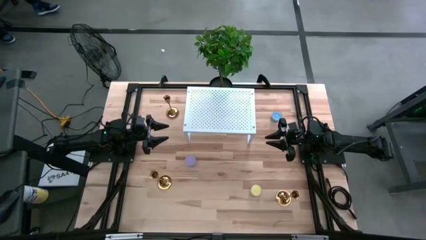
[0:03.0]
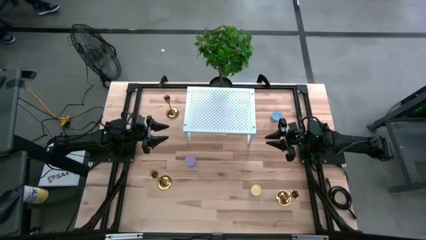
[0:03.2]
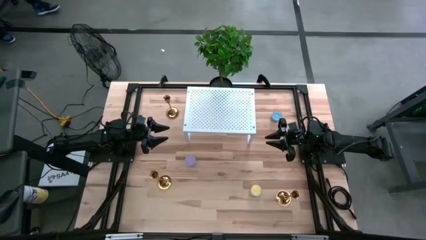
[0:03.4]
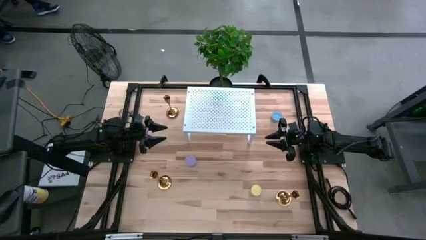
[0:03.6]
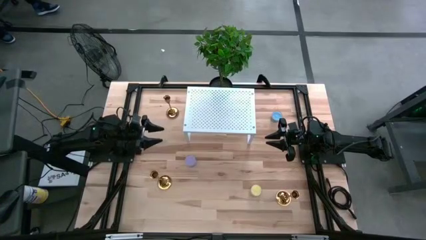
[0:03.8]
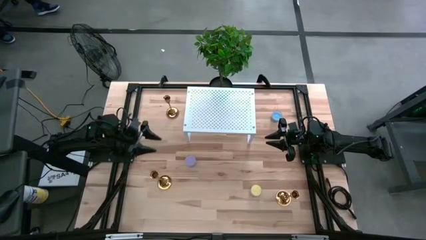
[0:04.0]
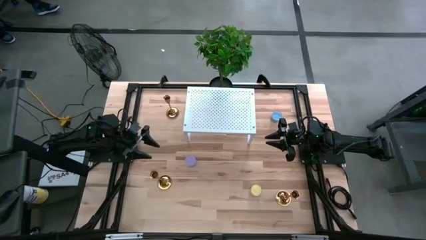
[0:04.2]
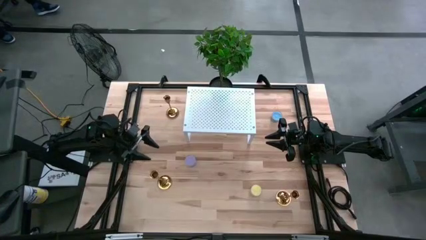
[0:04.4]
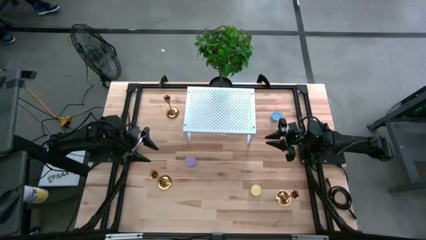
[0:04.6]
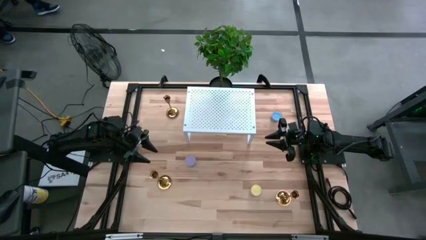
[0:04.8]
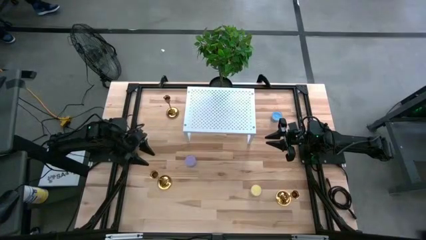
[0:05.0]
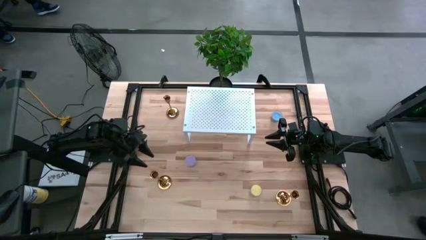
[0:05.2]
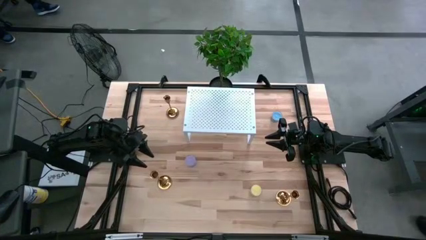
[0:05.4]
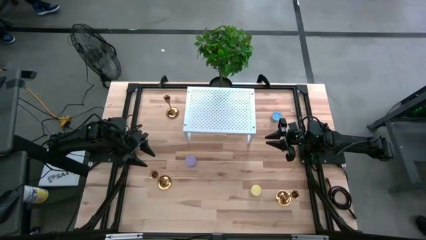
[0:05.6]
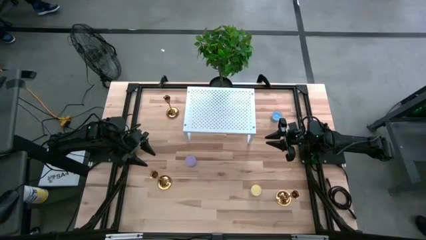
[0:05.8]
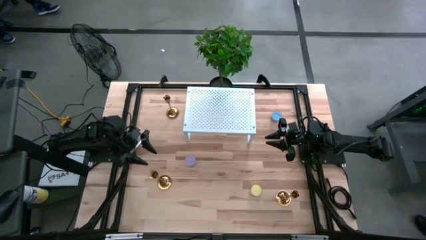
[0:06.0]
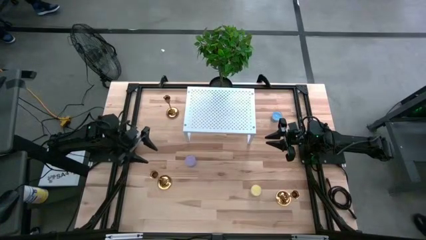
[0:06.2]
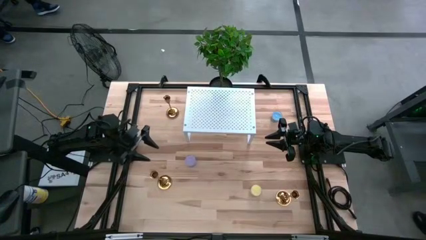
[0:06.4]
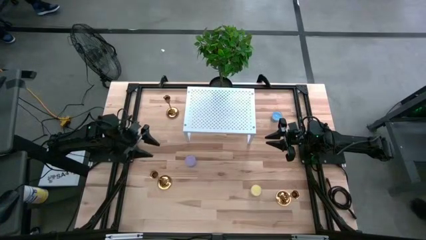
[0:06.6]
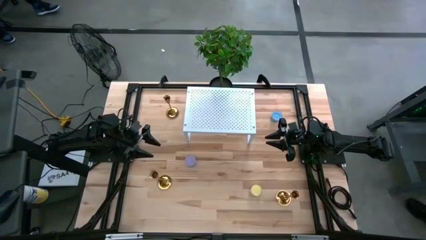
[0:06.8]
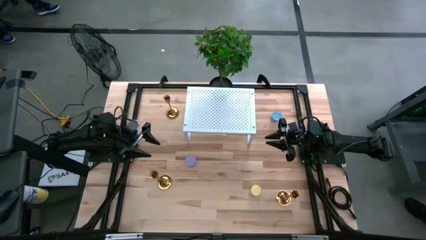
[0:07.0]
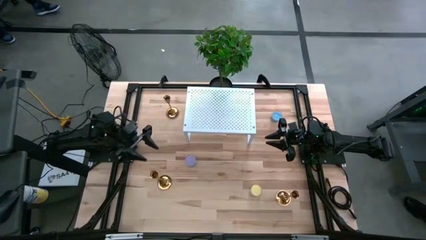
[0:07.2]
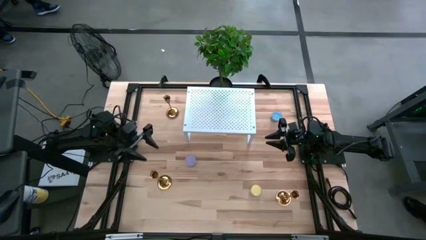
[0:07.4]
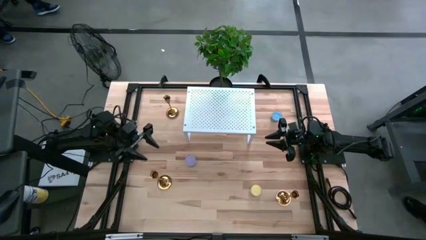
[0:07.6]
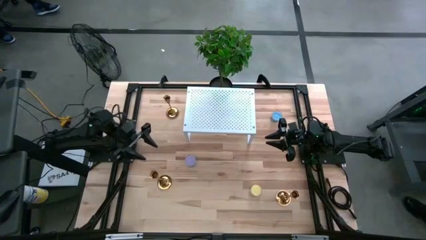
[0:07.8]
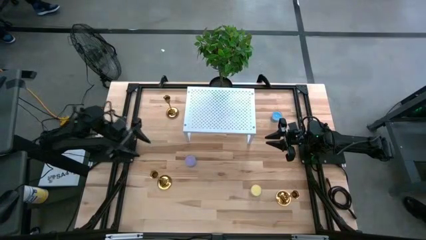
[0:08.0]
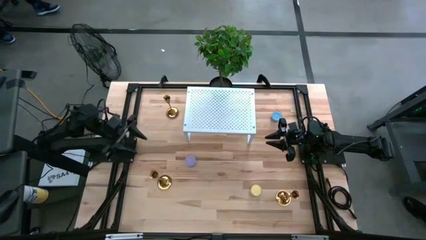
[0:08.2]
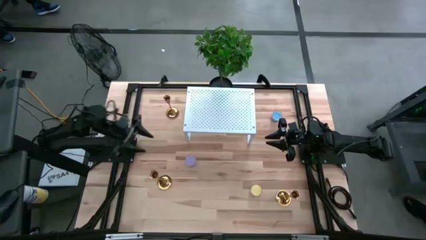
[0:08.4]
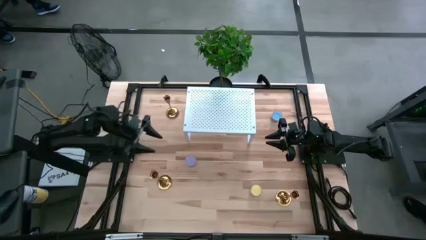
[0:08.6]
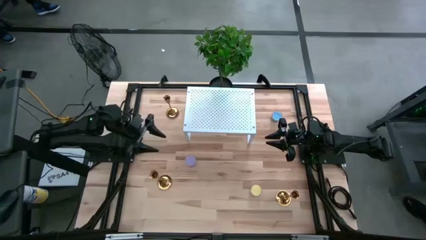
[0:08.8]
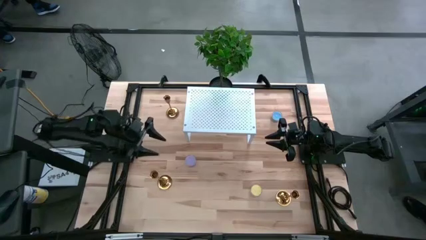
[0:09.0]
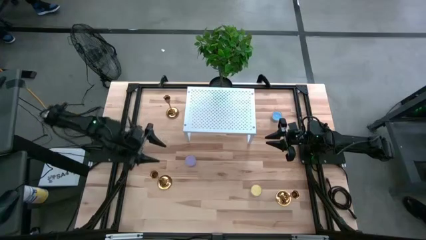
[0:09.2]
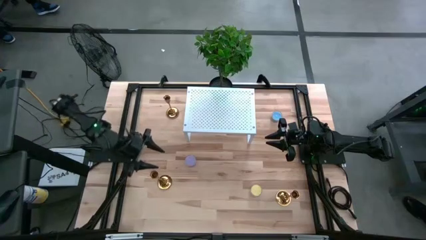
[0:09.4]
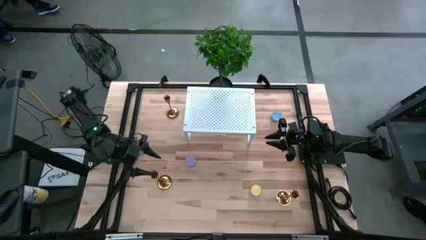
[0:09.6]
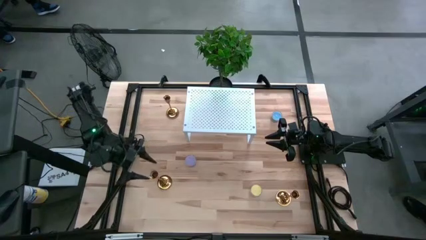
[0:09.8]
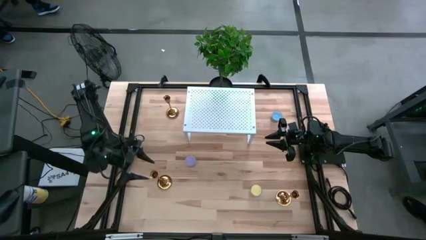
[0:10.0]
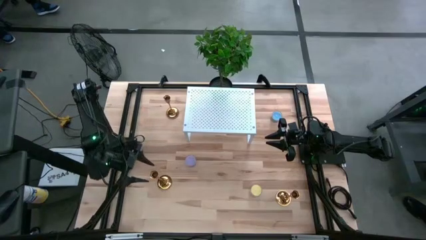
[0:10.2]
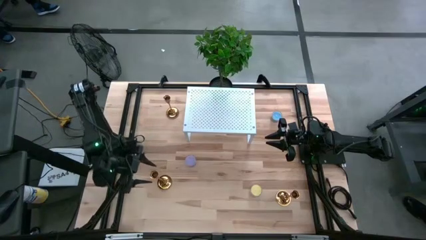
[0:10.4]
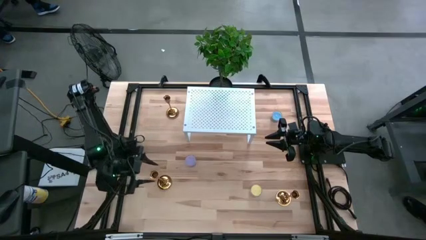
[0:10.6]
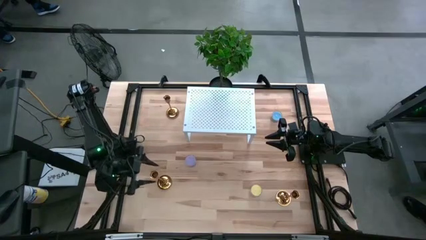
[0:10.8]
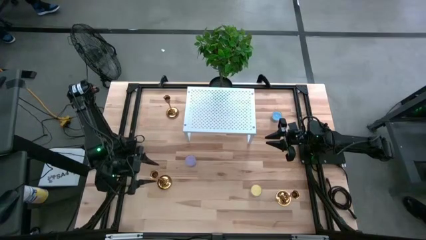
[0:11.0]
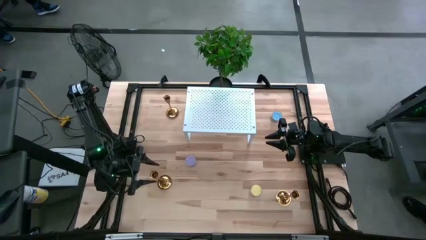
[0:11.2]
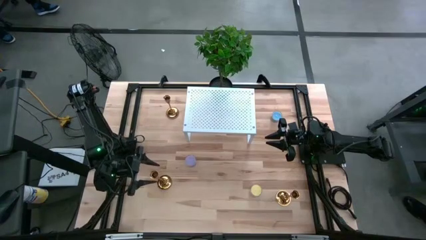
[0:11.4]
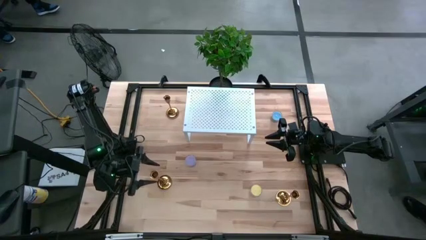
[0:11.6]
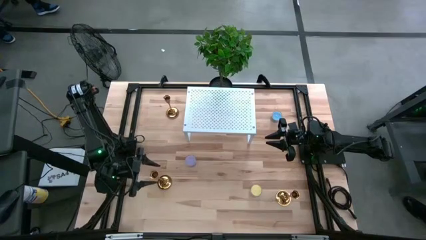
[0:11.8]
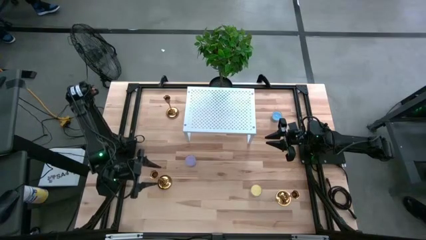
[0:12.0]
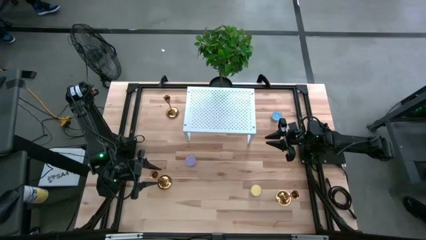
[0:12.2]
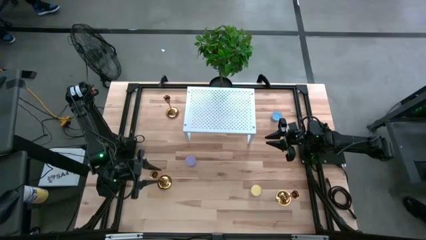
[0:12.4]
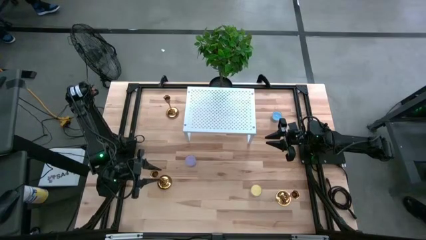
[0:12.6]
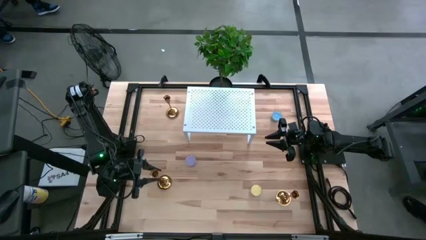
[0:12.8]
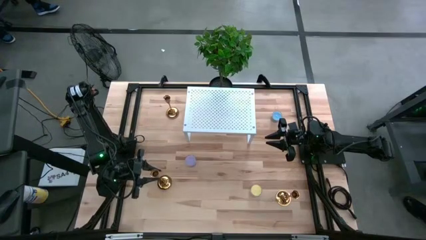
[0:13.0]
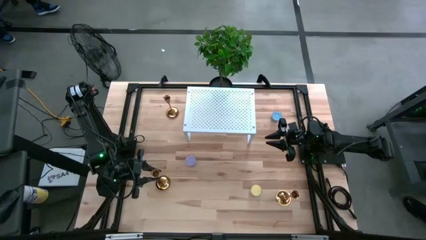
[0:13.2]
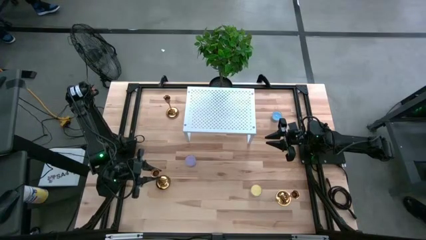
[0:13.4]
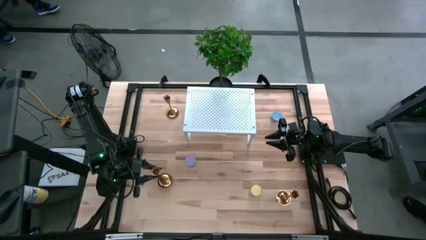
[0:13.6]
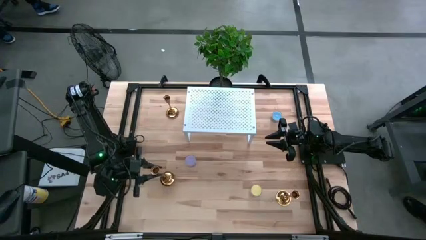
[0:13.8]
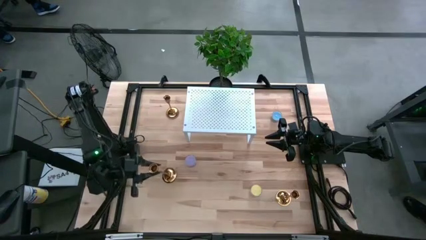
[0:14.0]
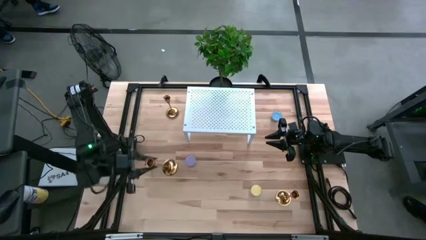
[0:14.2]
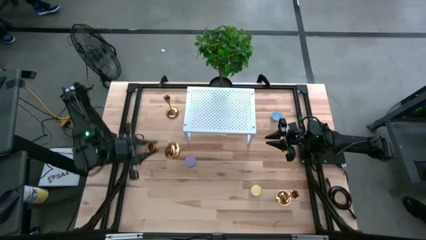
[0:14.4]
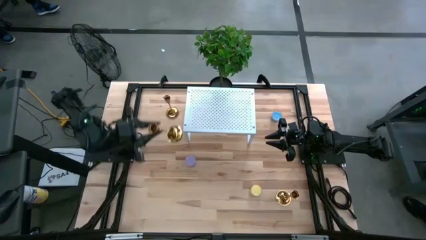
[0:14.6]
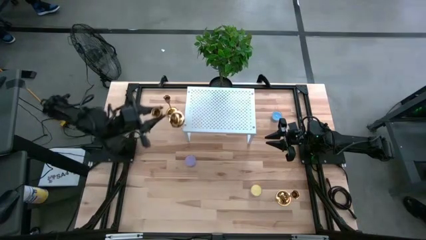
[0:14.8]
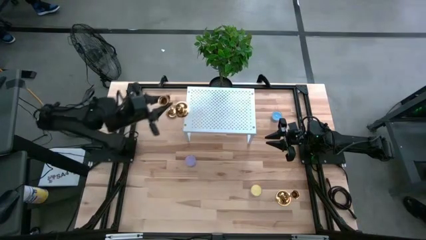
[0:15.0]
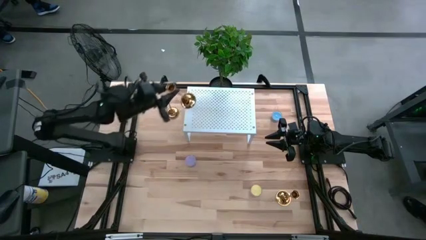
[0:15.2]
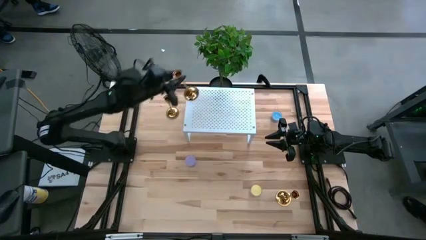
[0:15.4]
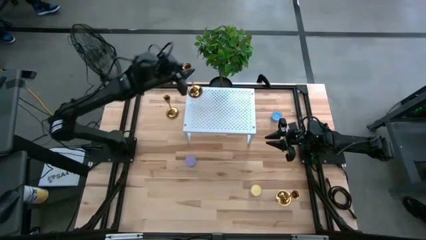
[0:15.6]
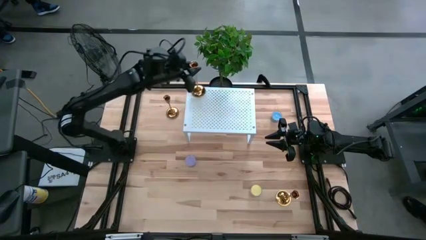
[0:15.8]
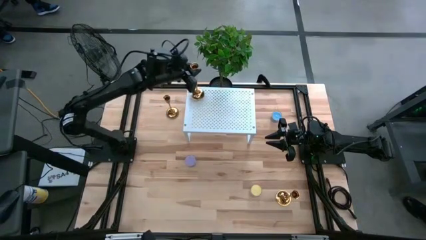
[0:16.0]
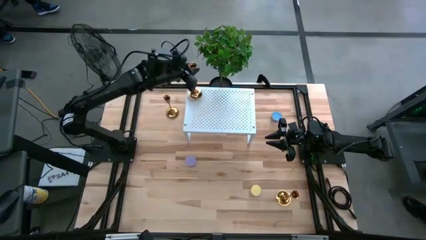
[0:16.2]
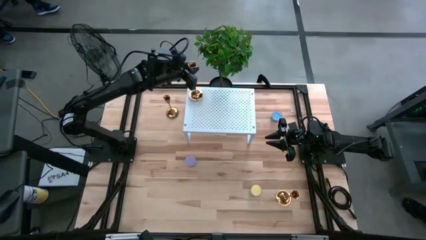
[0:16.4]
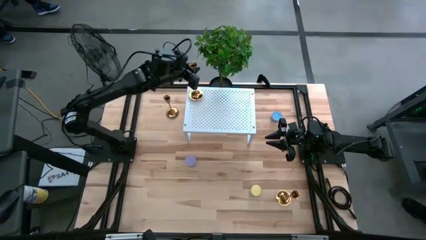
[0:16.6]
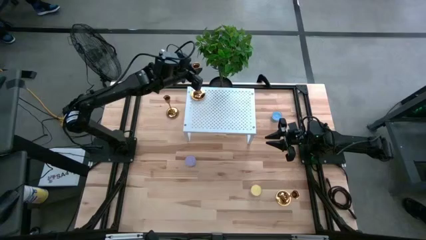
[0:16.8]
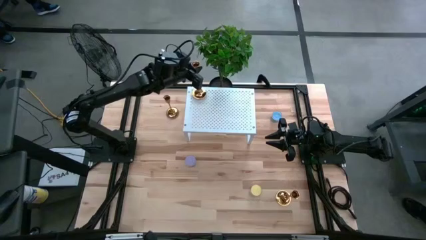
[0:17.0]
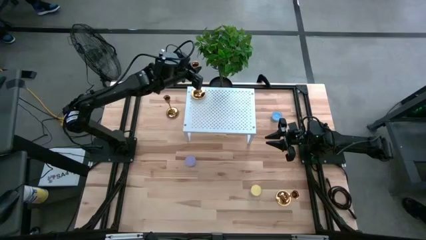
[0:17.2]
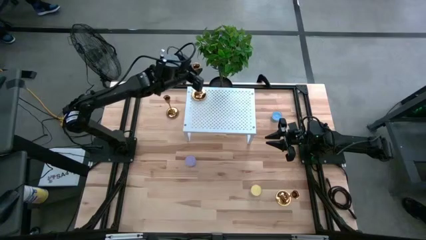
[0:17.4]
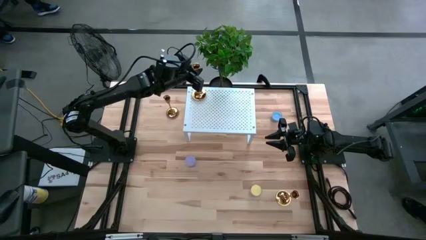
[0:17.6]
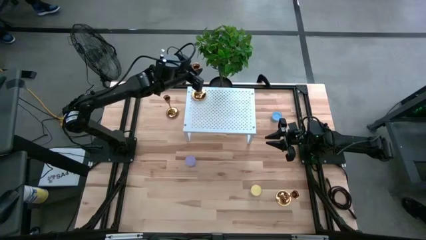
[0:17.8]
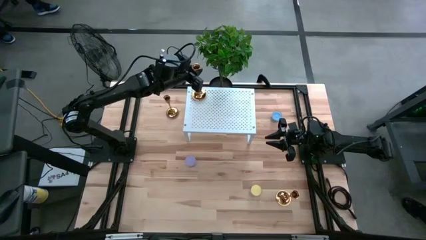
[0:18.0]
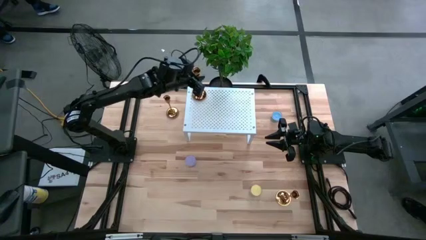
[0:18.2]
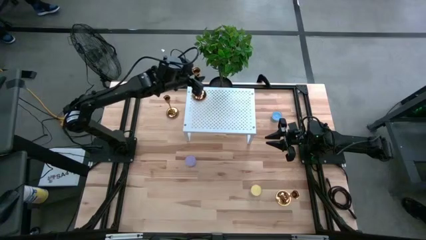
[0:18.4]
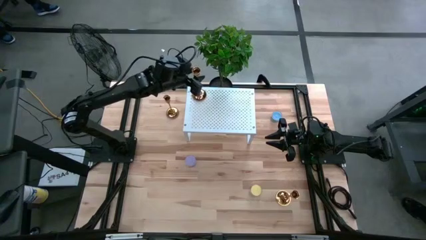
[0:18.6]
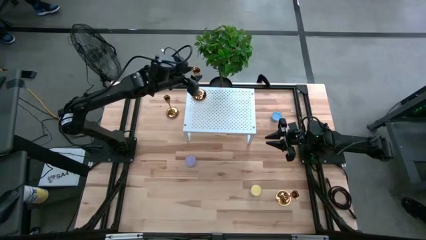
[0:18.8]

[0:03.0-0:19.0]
Task: Pick & Place candle stick holders
Put the bottom left gold candle holder on the shelf
